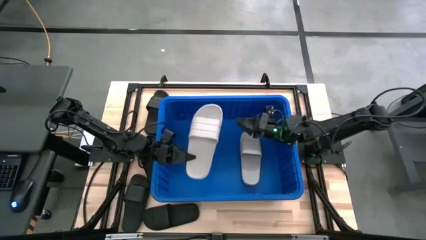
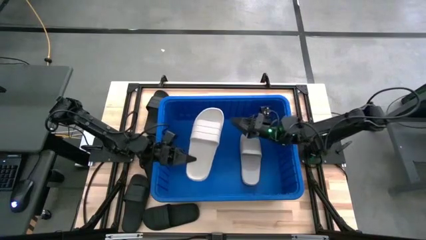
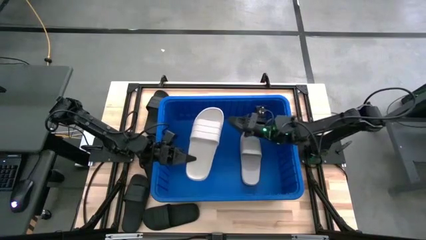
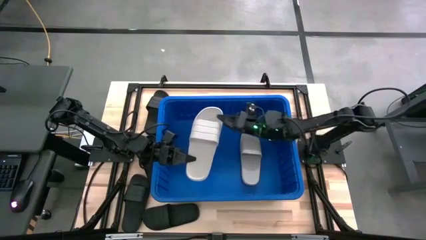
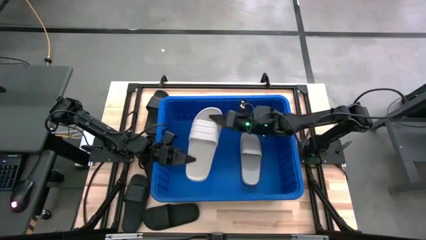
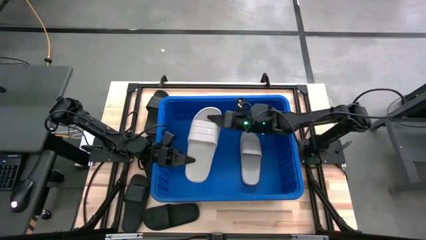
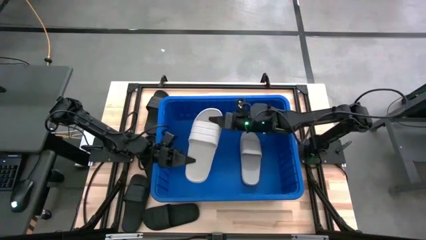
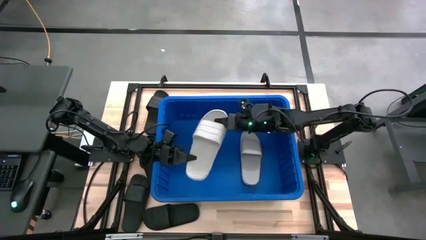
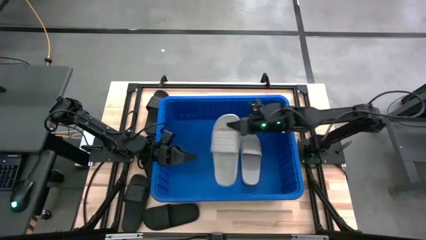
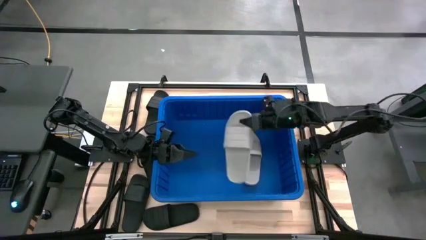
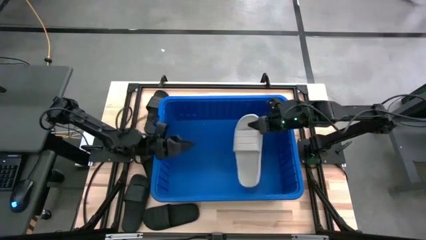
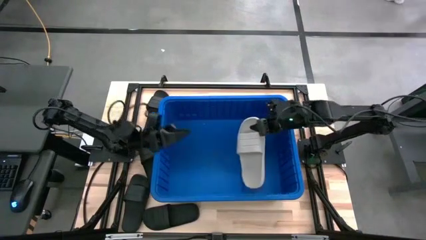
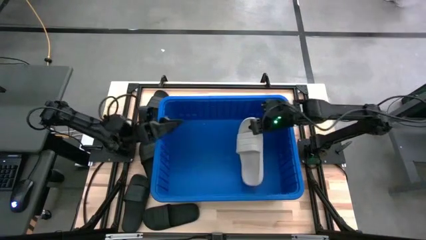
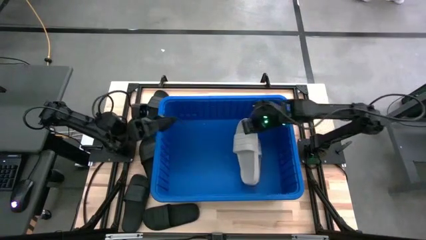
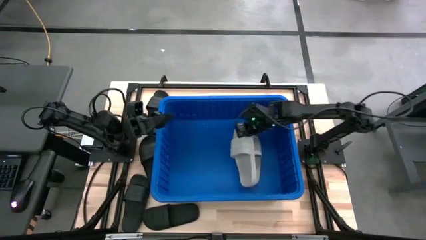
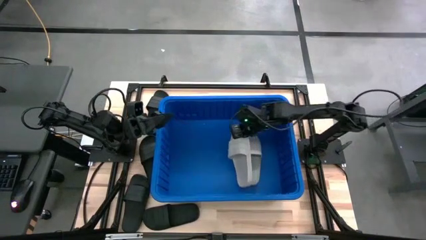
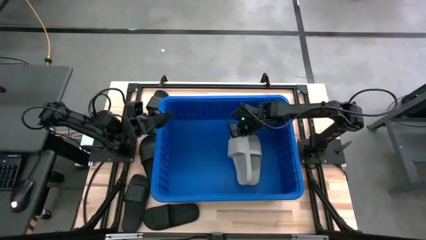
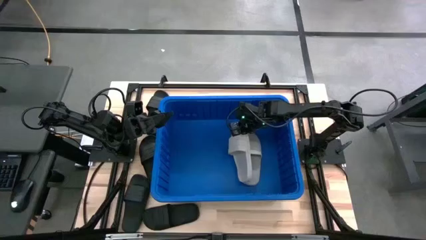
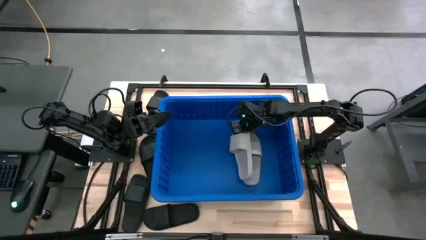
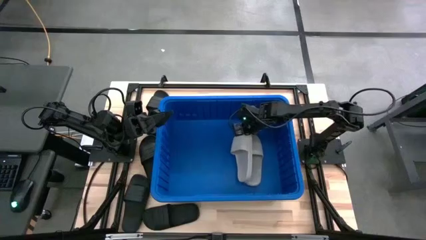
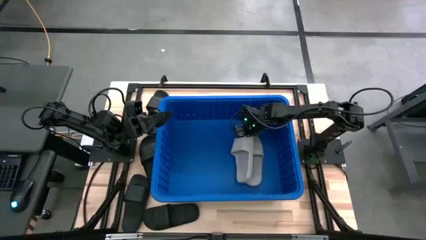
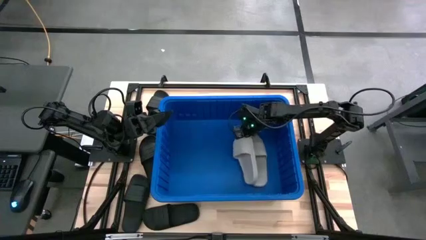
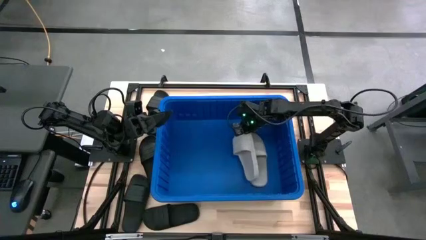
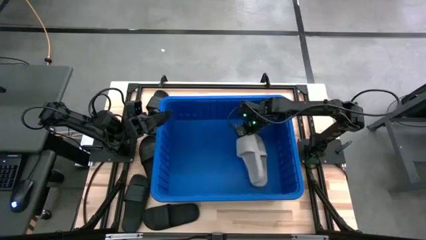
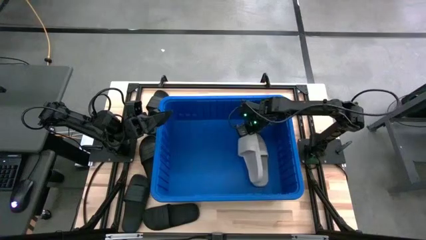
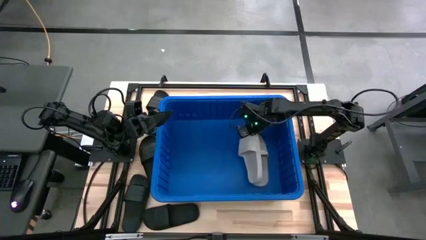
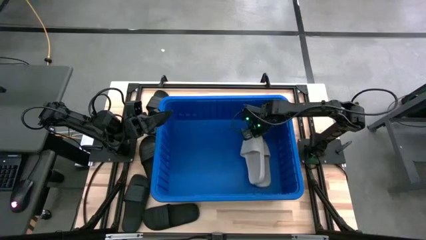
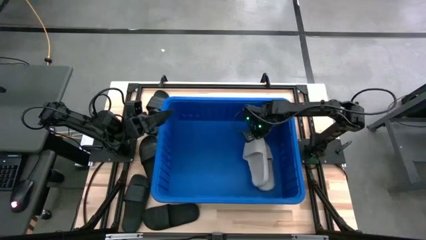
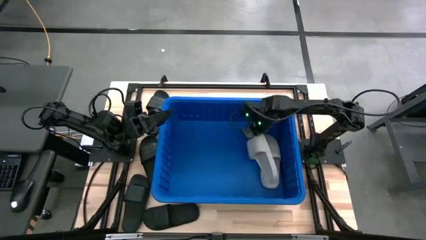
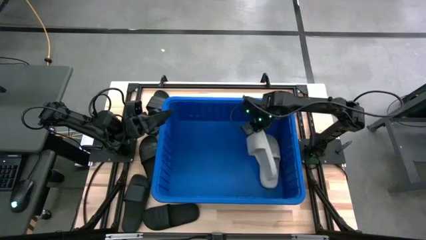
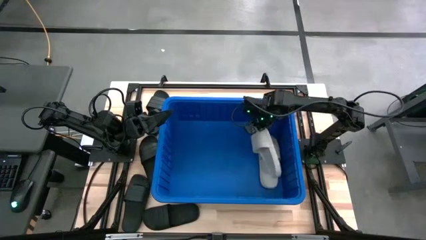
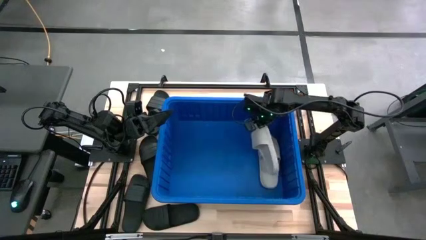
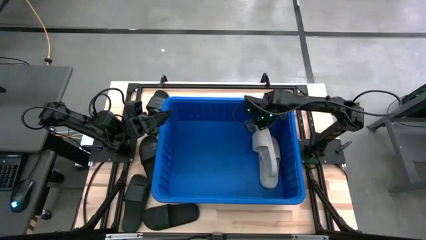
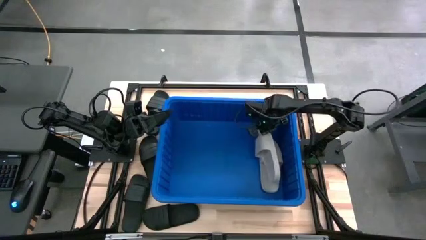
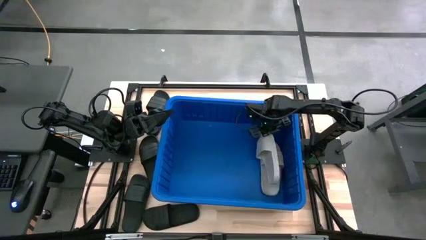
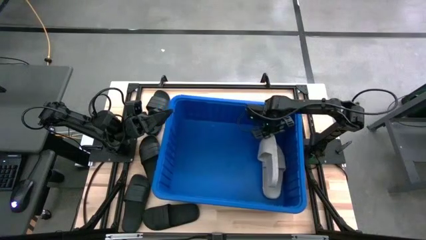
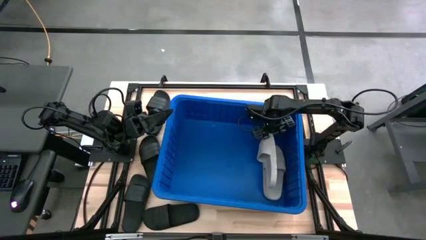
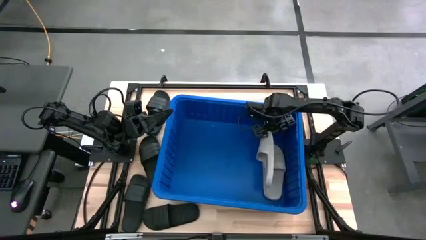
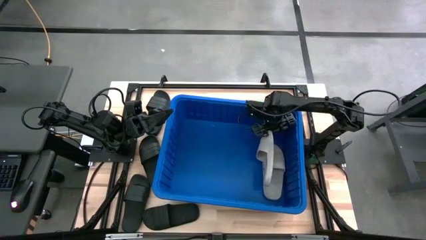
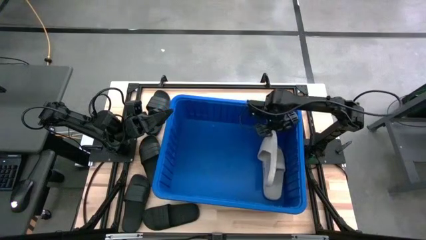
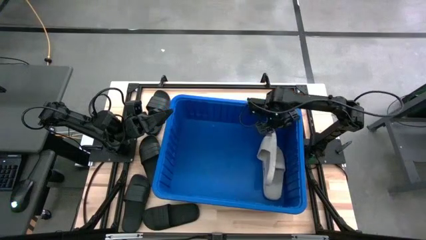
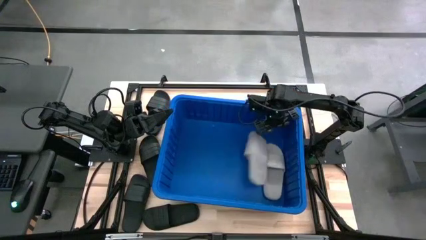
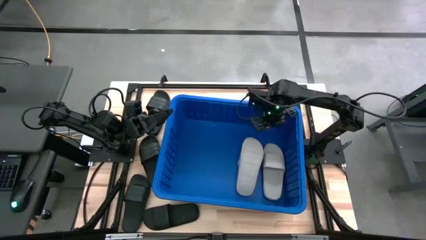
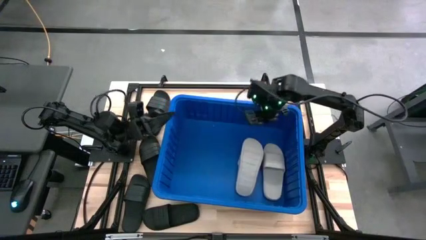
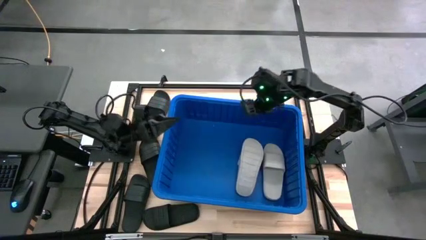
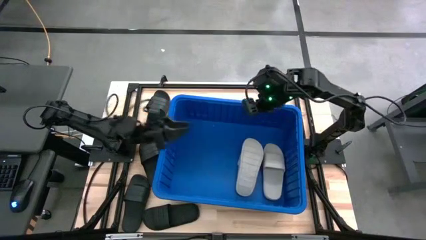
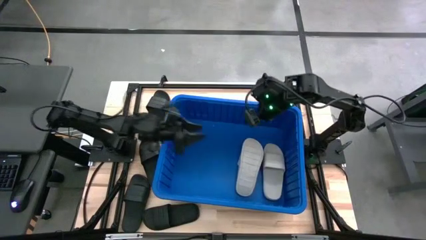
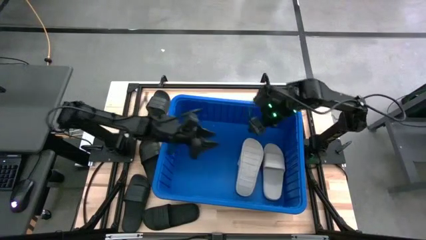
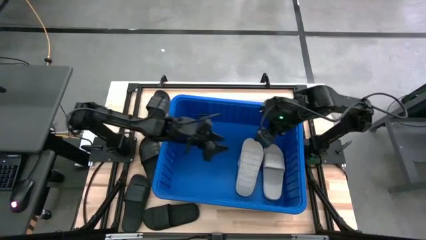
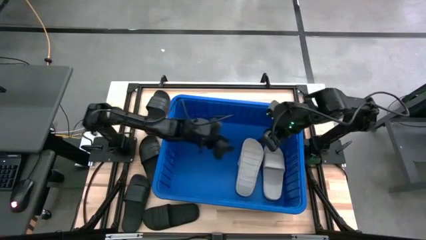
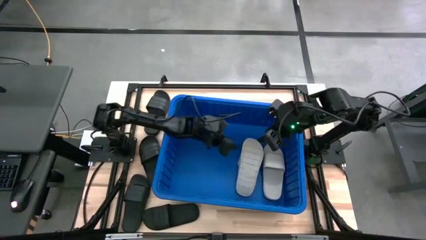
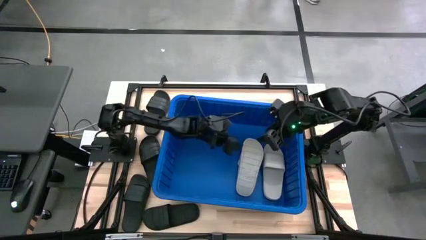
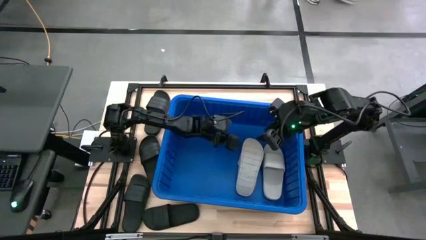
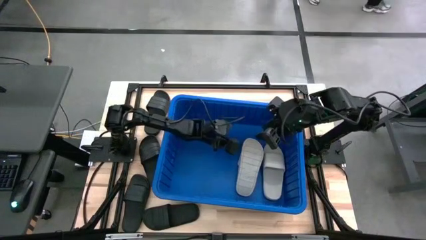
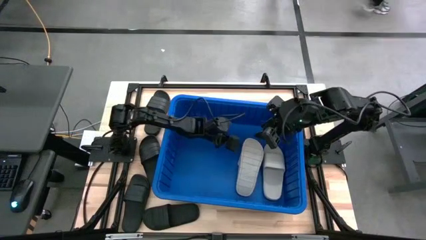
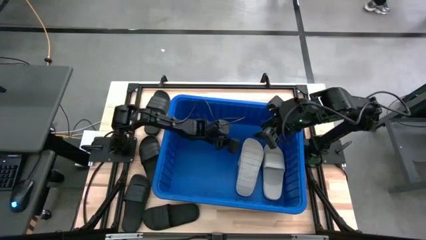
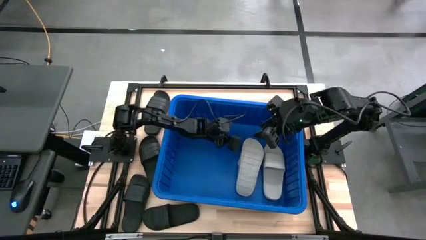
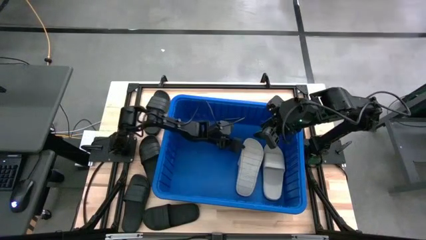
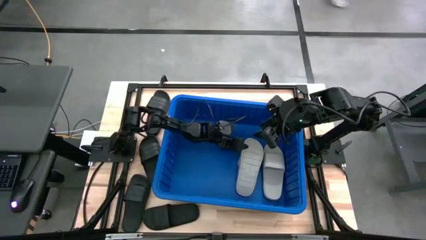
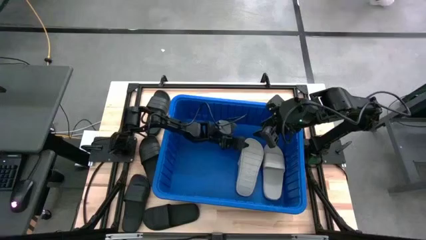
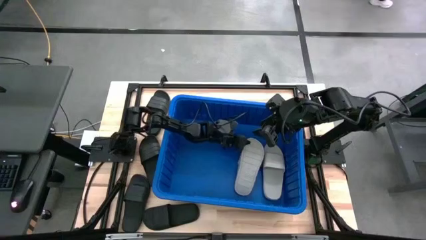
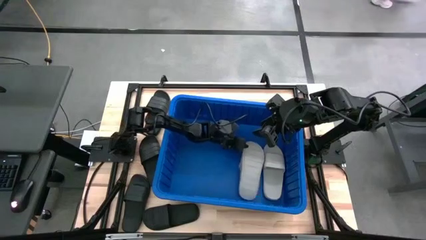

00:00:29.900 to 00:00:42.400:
Task: Pick and place slides into bin
Put the gray slide into the blue organizer bin
